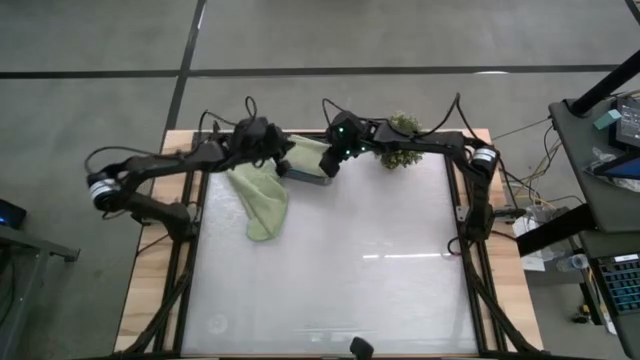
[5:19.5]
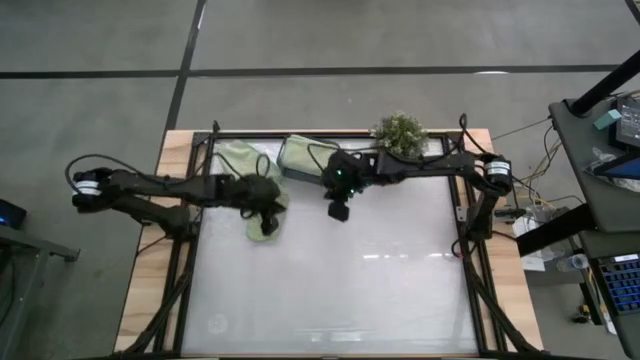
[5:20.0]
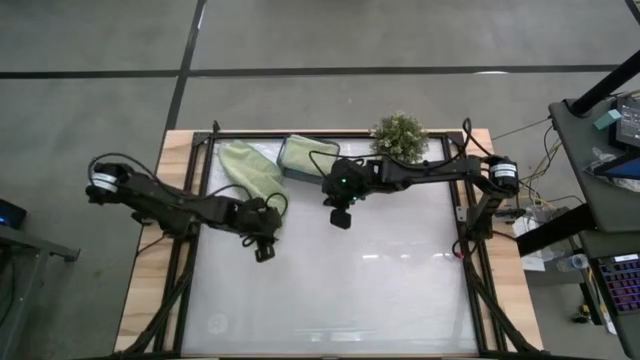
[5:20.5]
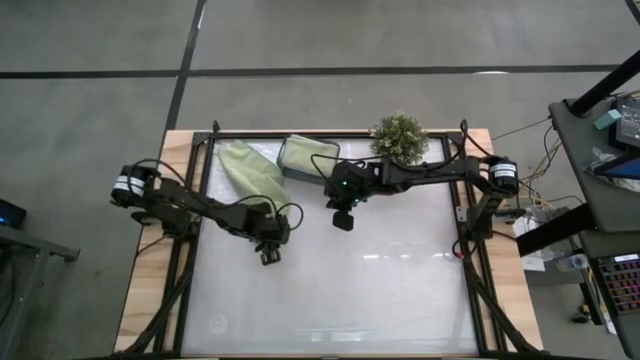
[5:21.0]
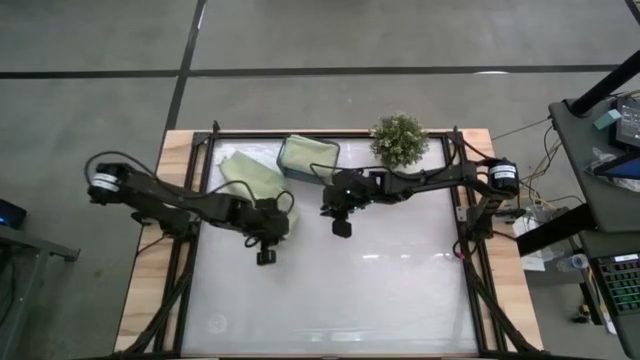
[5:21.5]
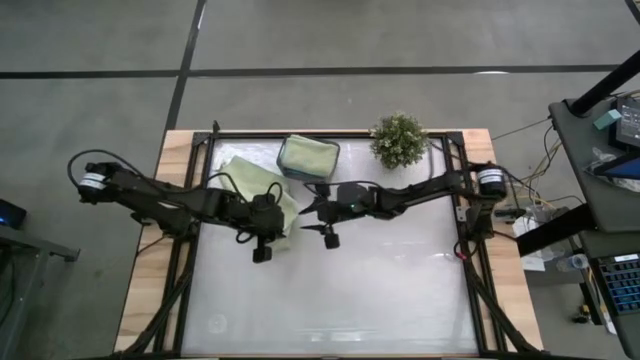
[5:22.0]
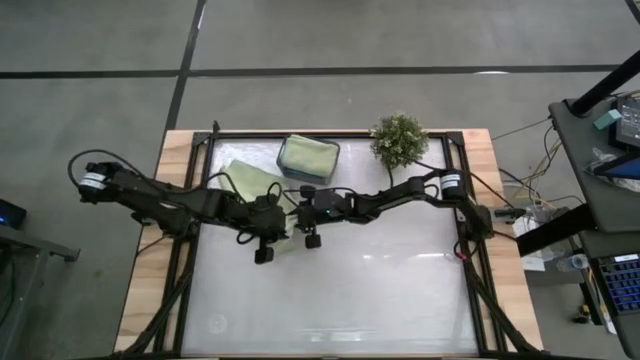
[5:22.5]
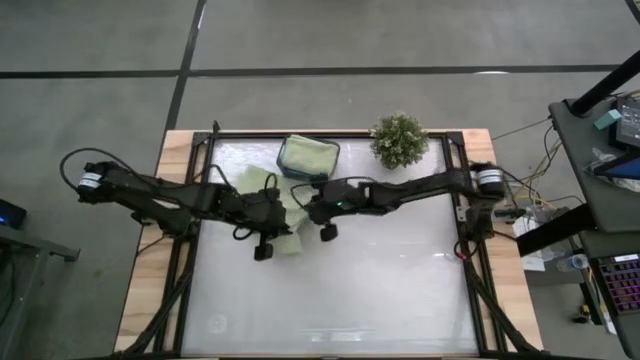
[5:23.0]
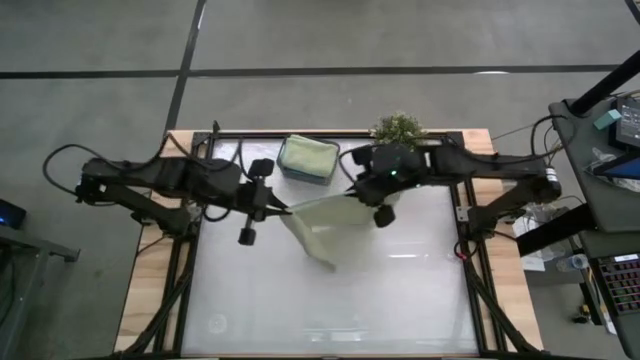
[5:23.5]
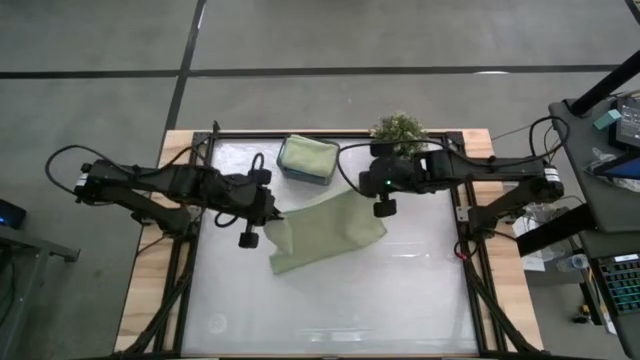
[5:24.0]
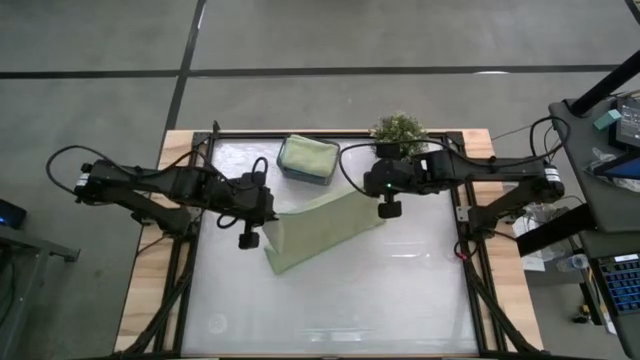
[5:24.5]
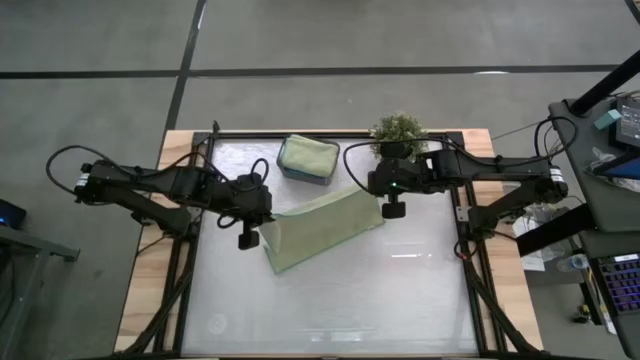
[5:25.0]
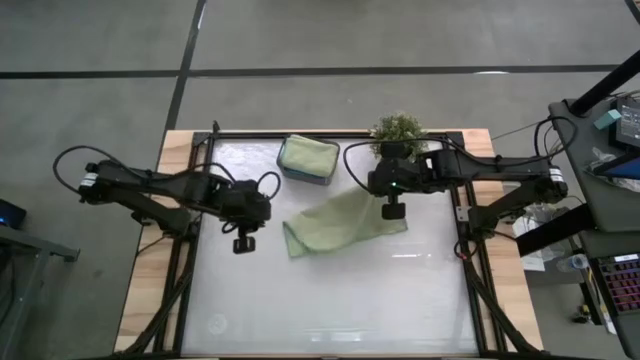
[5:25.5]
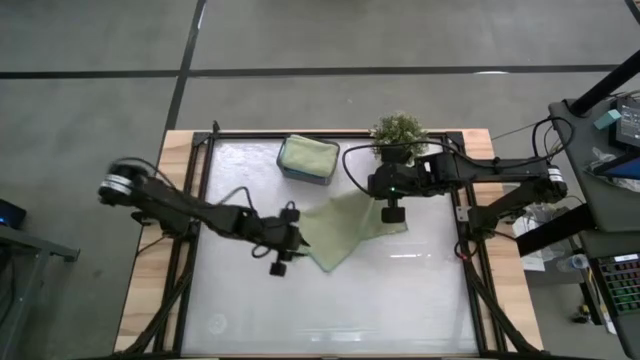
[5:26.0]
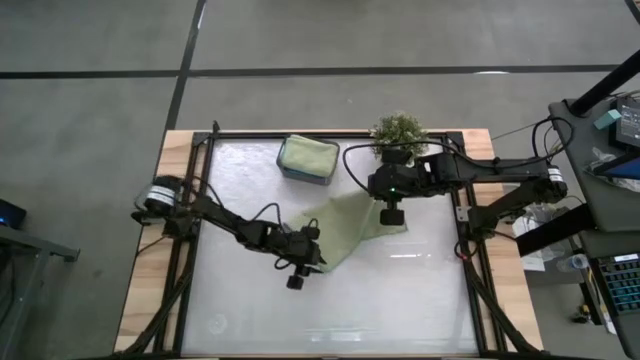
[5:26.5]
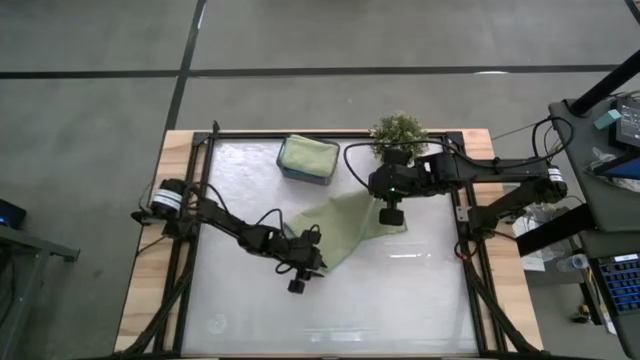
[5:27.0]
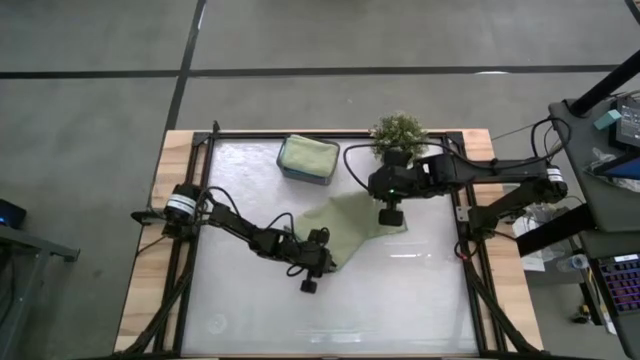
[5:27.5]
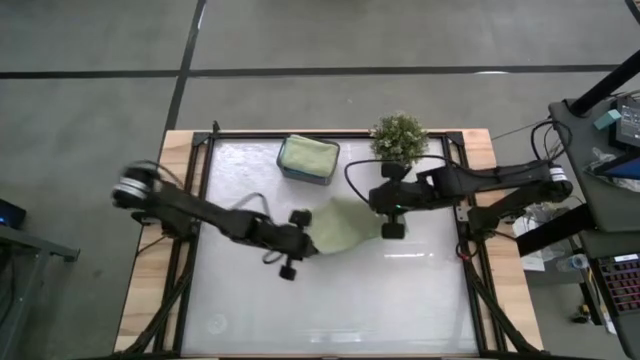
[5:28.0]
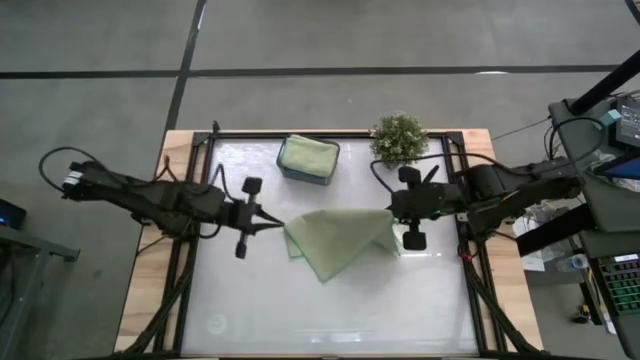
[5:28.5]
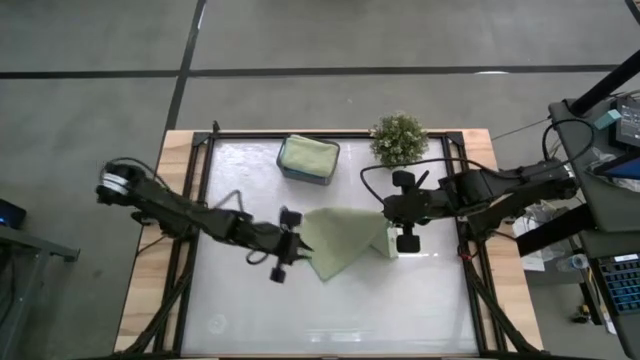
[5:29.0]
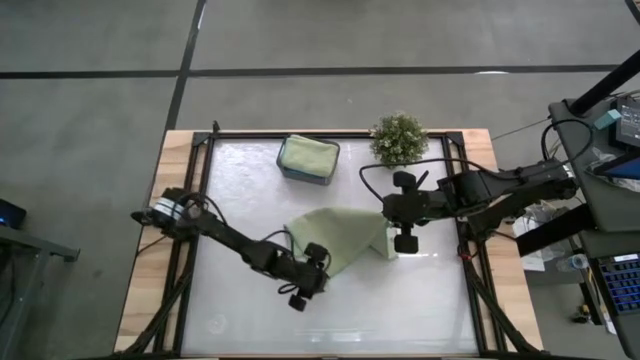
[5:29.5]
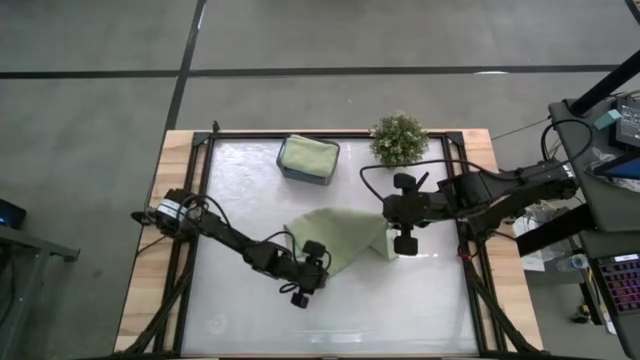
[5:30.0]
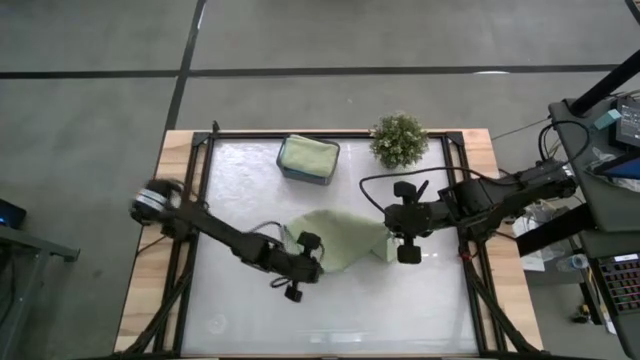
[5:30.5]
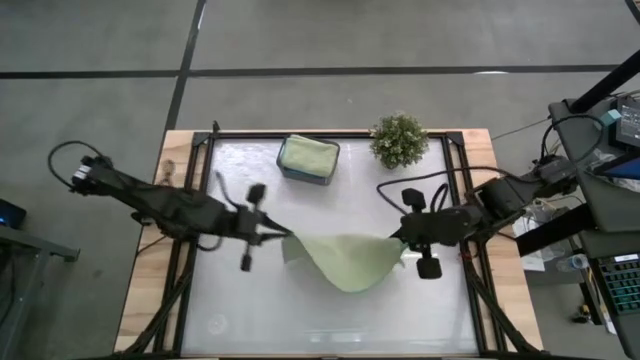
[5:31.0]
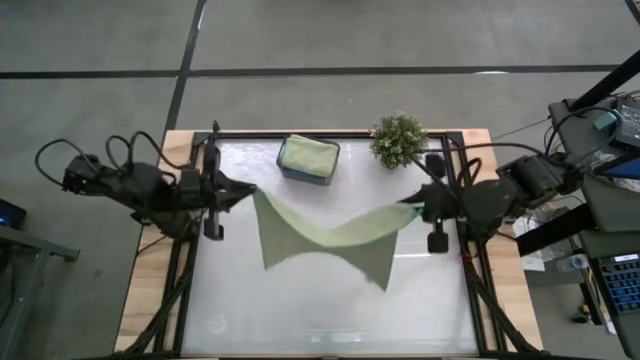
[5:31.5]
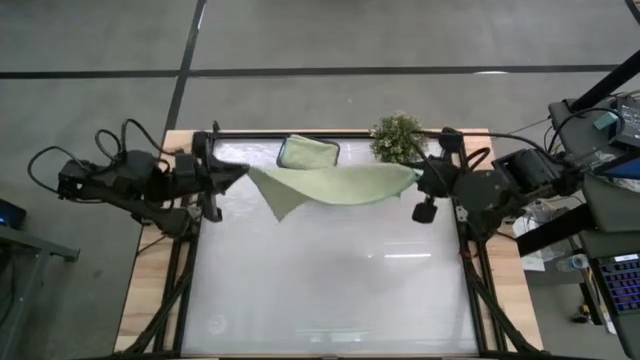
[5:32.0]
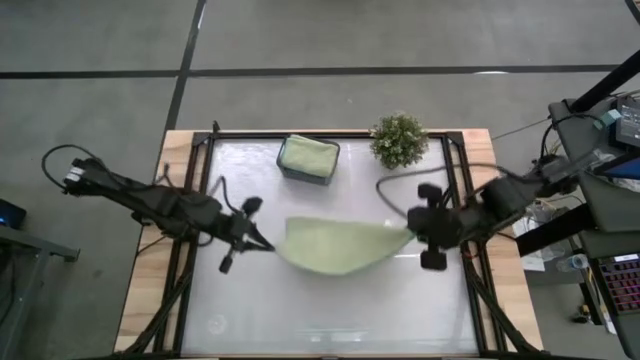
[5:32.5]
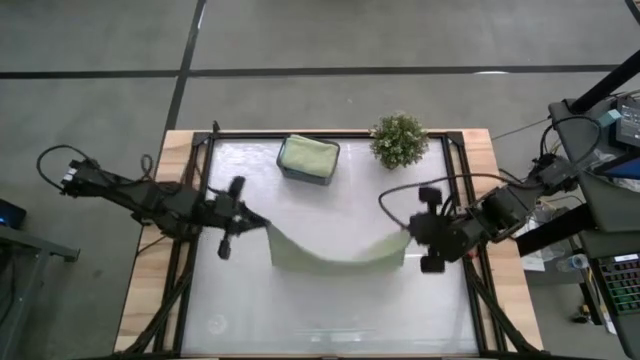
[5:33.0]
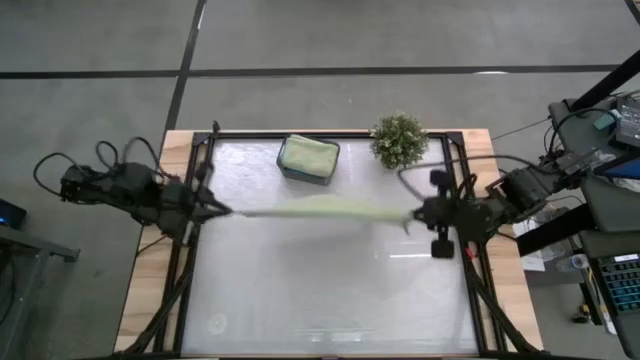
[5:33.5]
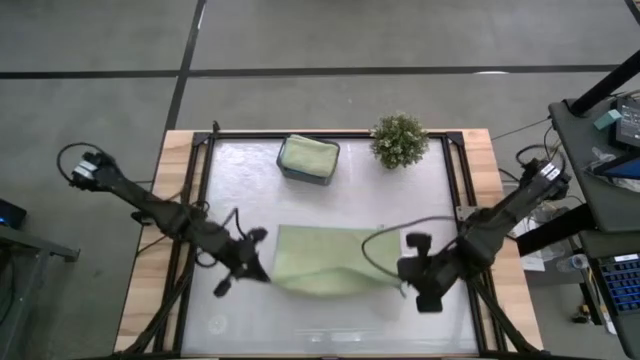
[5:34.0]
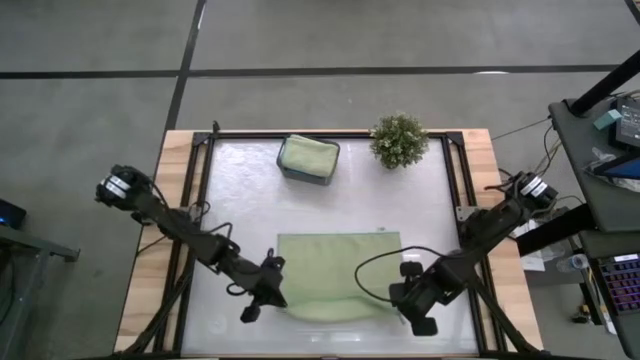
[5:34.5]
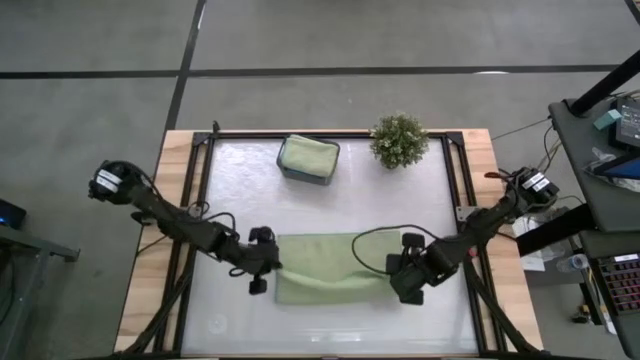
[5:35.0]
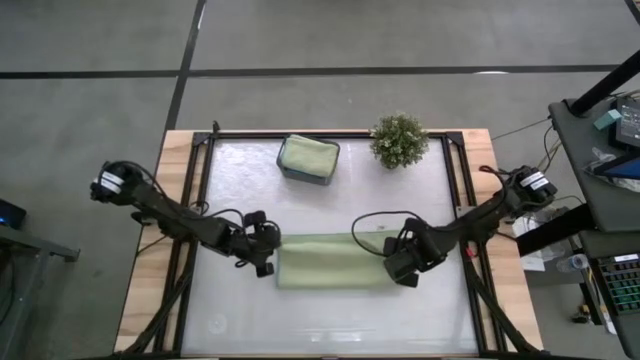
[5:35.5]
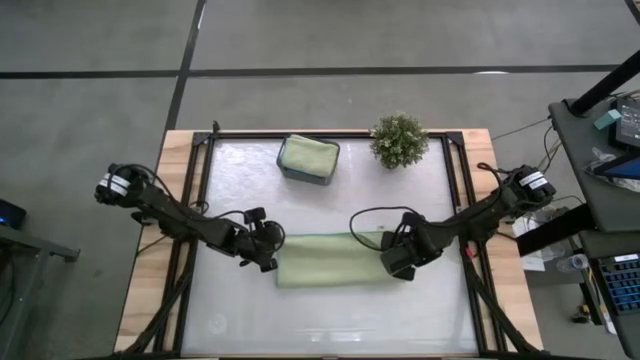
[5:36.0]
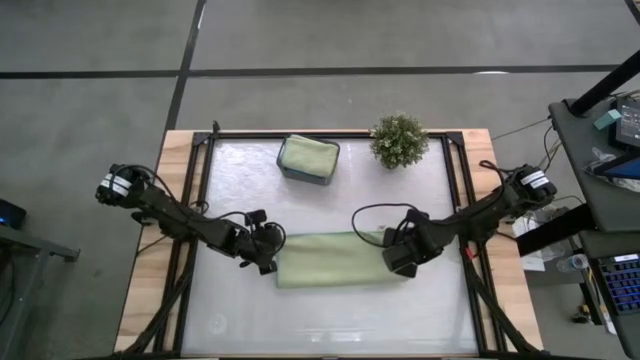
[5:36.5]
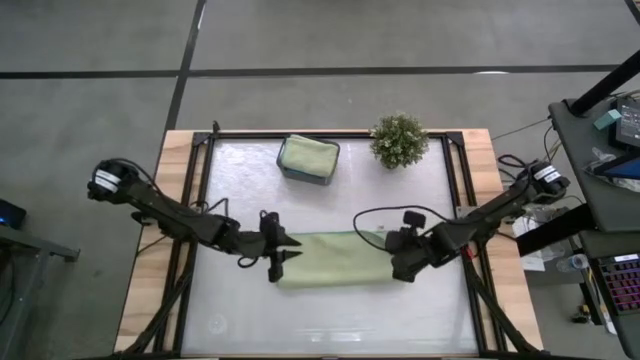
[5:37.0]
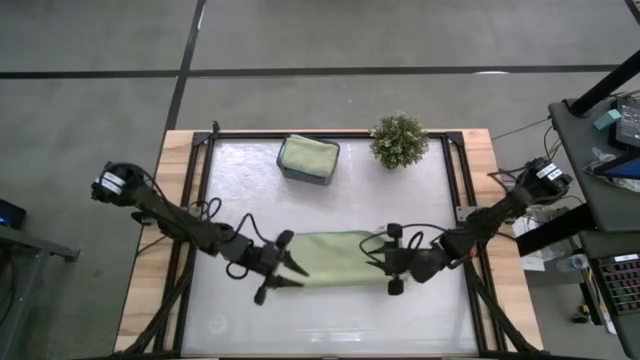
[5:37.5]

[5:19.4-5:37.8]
Task: Fold microfiber towels
Fold the green microfiber towel

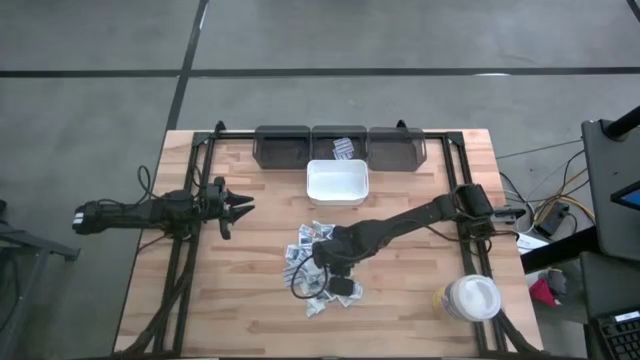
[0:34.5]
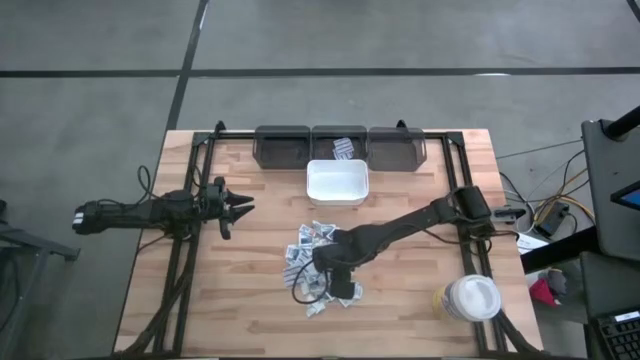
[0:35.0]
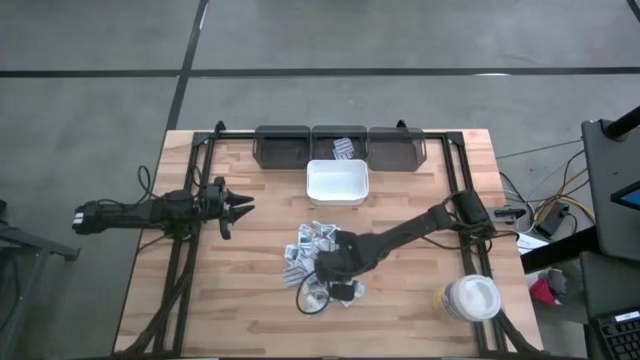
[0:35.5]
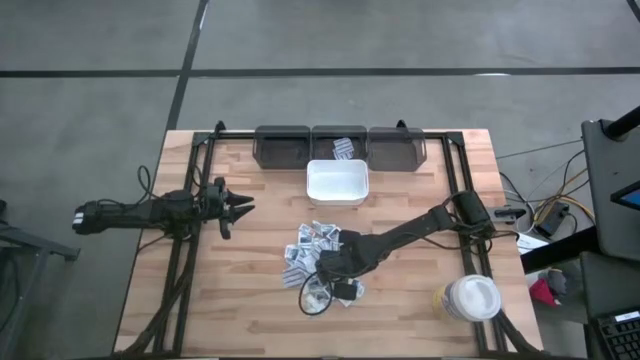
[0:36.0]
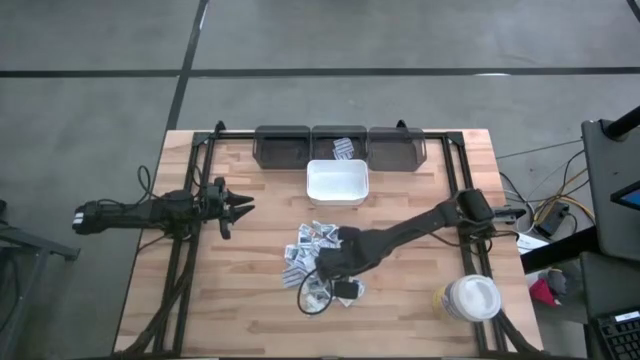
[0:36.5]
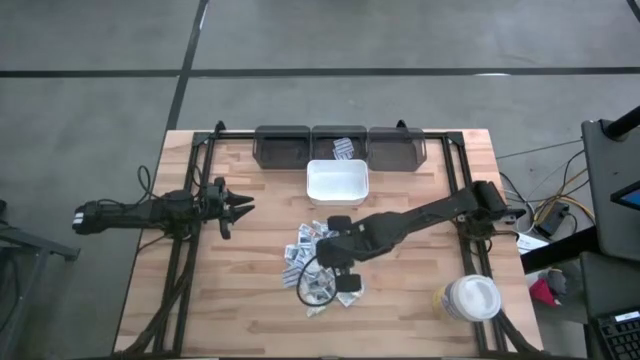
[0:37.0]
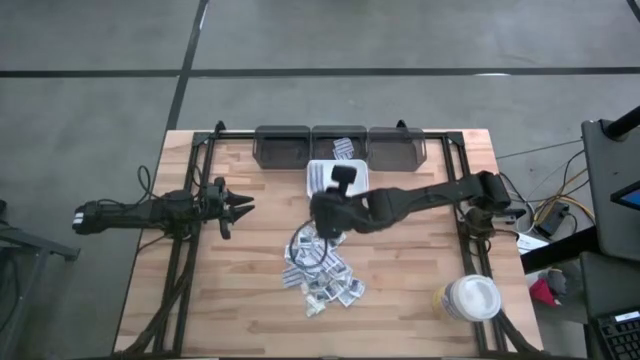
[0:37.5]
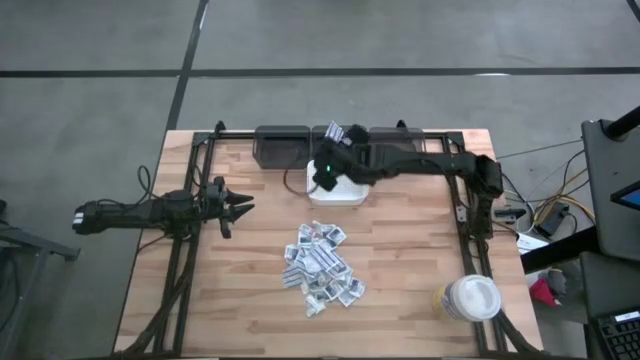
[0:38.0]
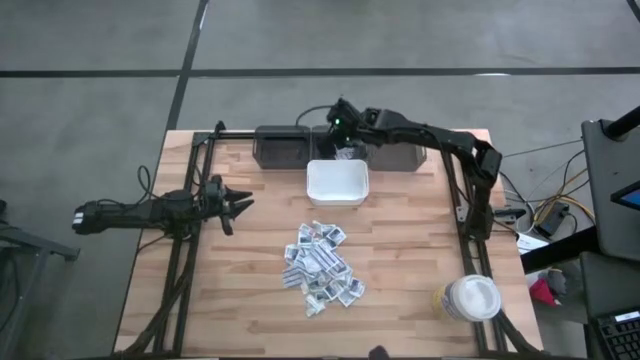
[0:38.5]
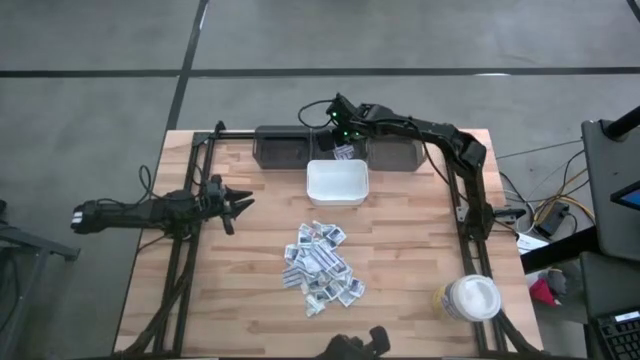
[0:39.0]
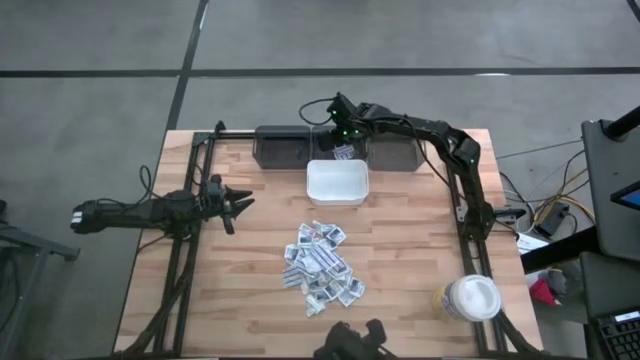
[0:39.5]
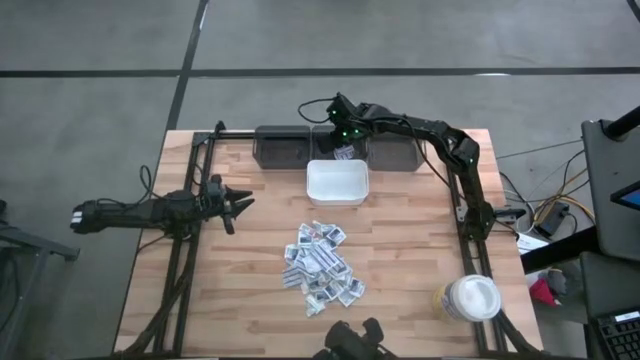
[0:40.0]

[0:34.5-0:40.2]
Task: Pick & Place First Aid Supplies
Put the blue bandage into the middle black bin
